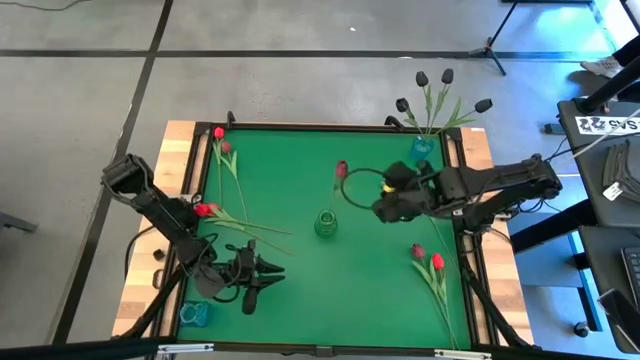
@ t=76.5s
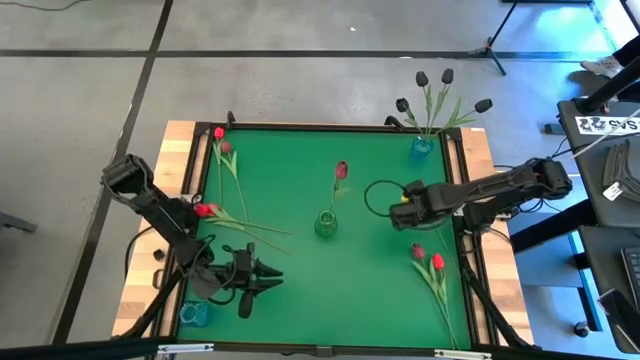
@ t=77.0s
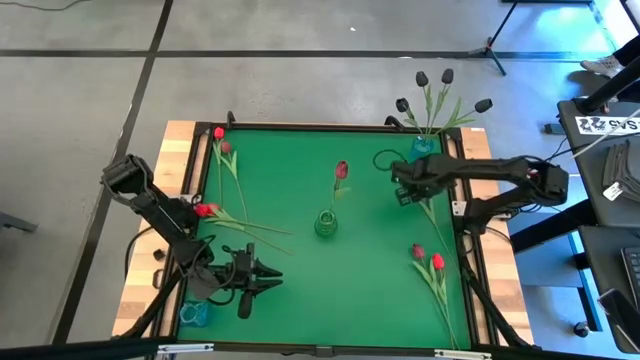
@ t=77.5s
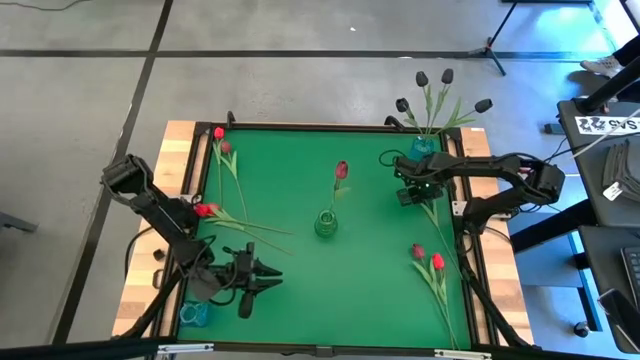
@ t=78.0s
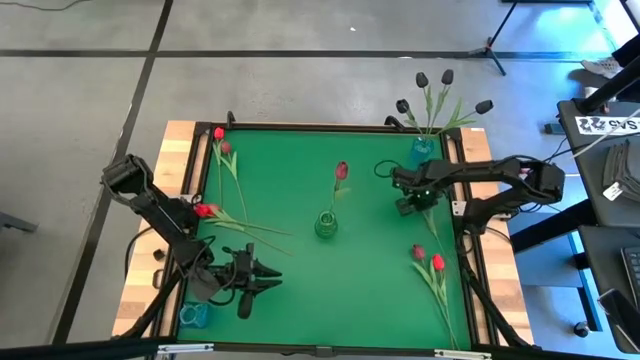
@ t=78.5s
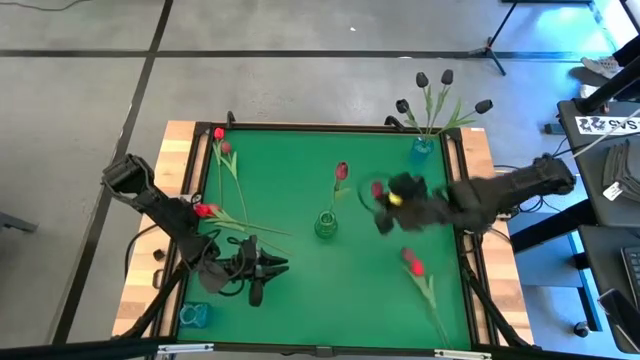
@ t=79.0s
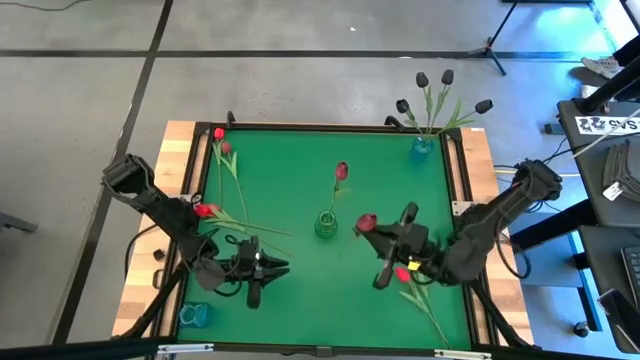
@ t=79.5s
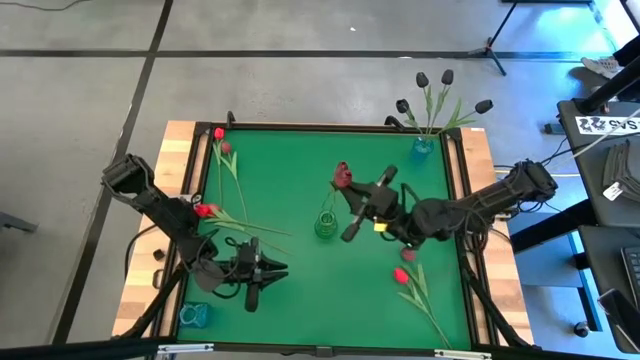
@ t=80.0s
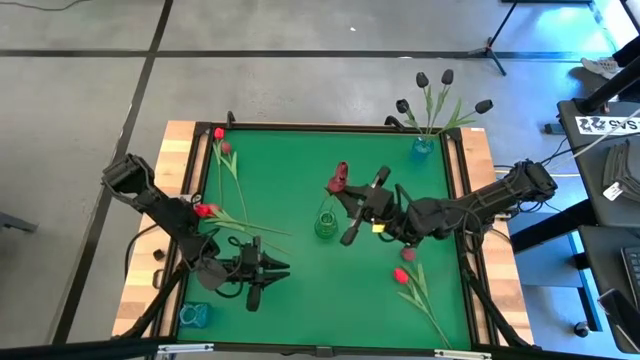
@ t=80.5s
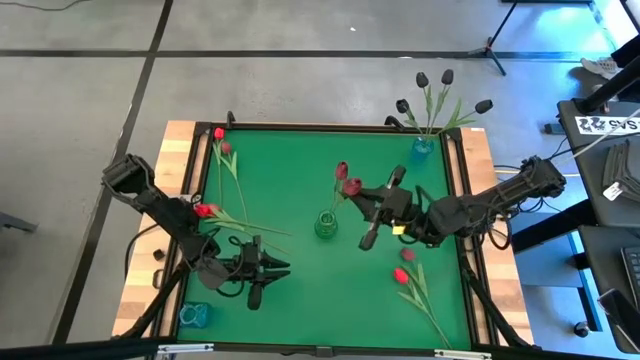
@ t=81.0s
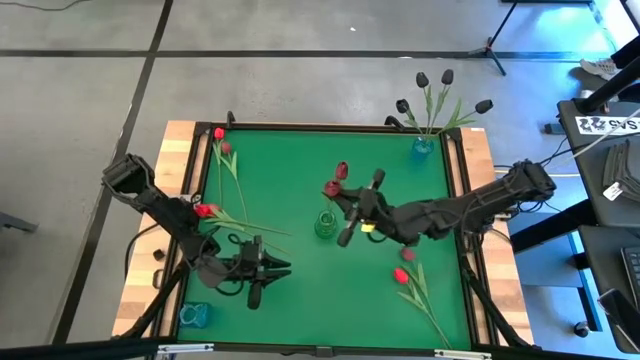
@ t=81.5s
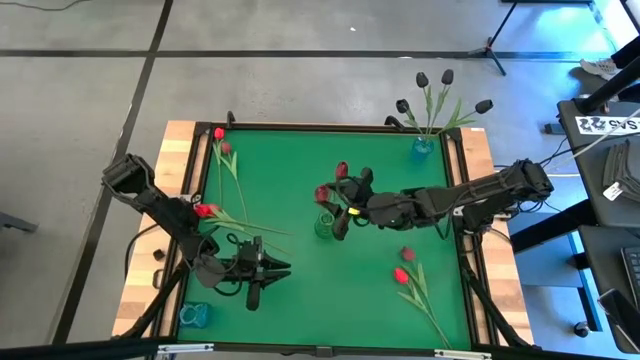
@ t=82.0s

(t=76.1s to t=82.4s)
Task: Sort flowers into vase by color
Put the middle right pink flower into the green vase

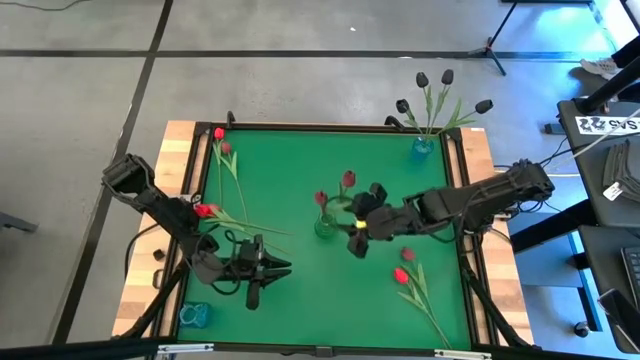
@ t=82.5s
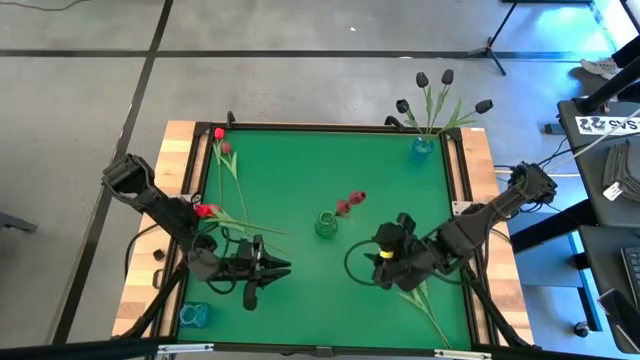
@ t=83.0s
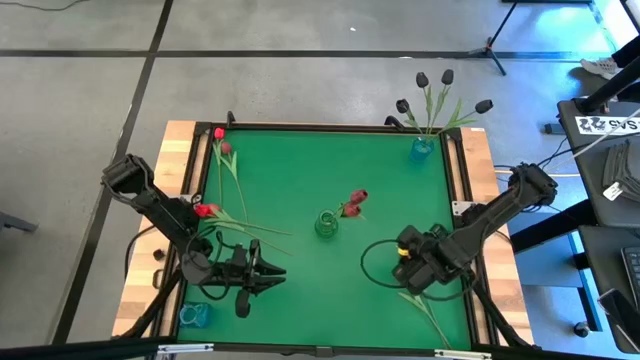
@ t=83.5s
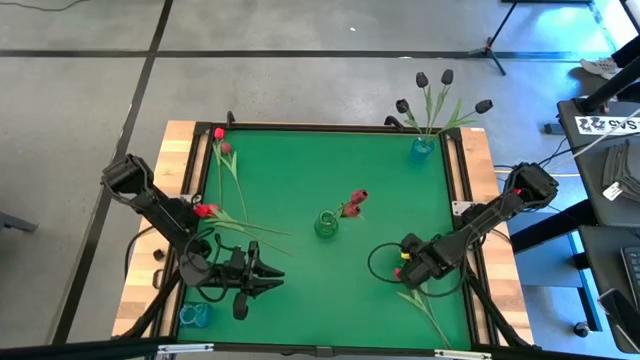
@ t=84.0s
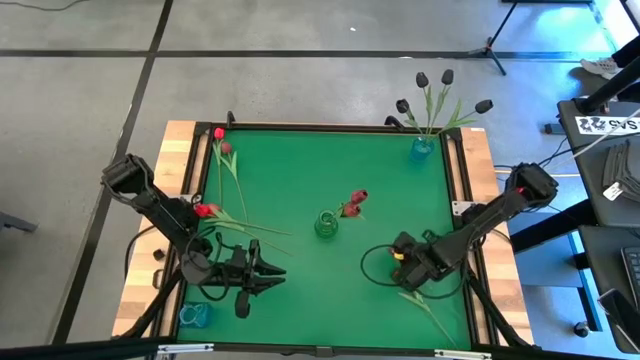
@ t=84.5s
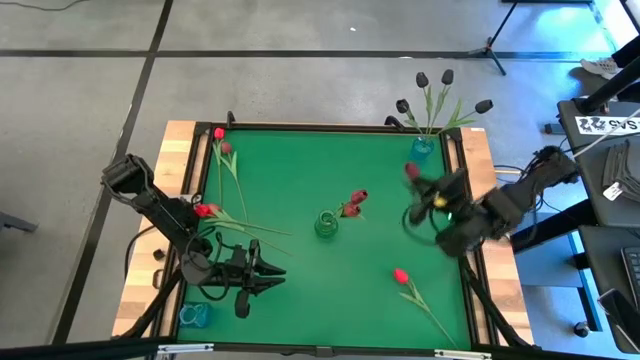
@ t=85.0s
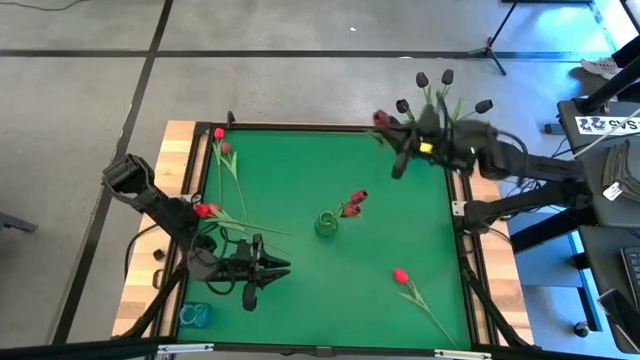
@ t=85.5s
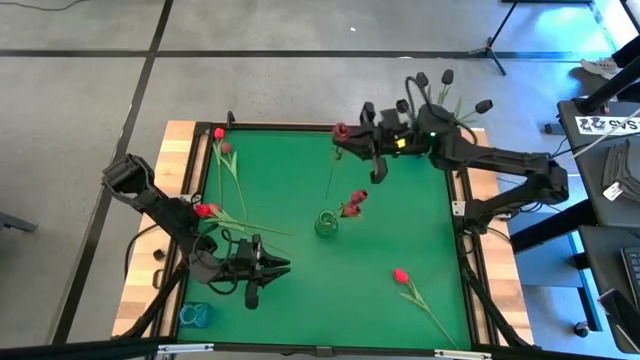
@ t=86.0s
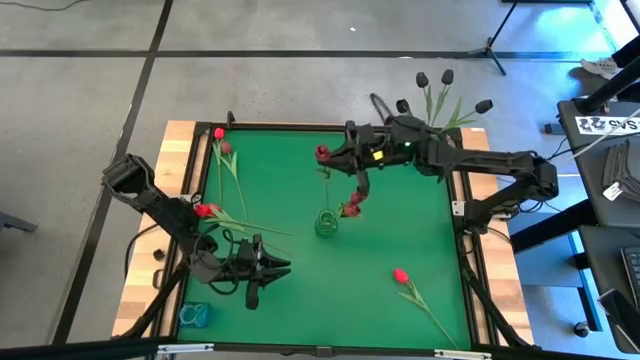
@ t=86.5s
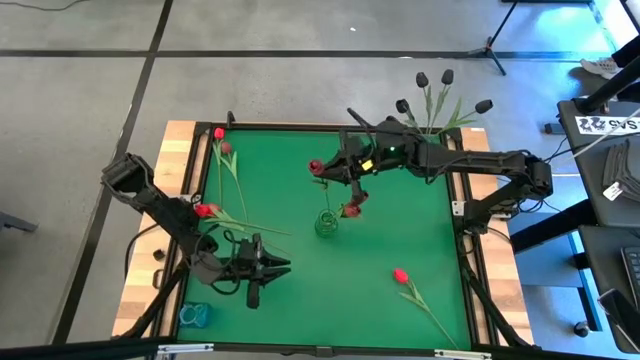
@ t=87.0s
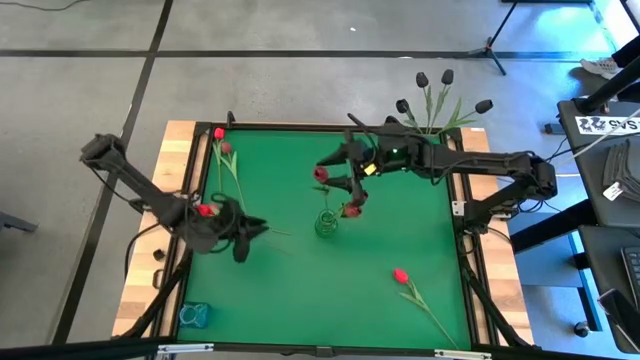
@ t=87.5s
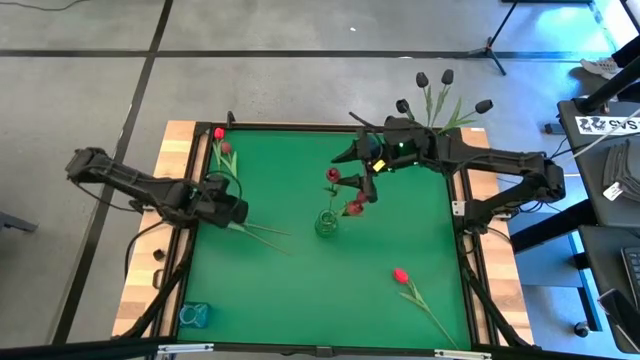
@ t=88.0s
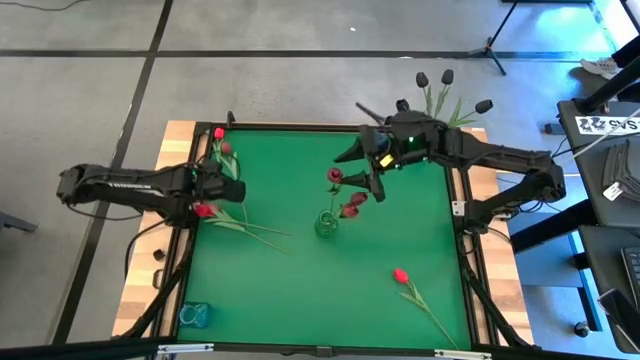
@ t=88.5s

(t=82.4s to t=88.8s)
Put the bottom pink flower into the green vase

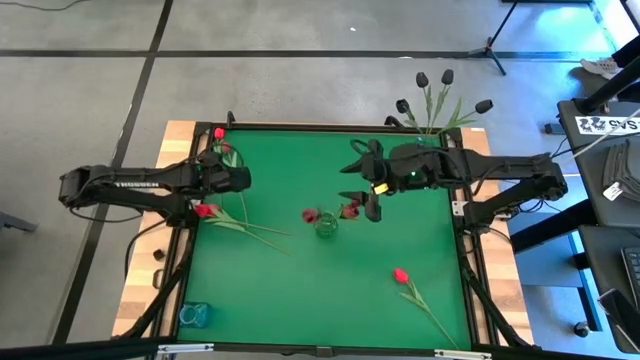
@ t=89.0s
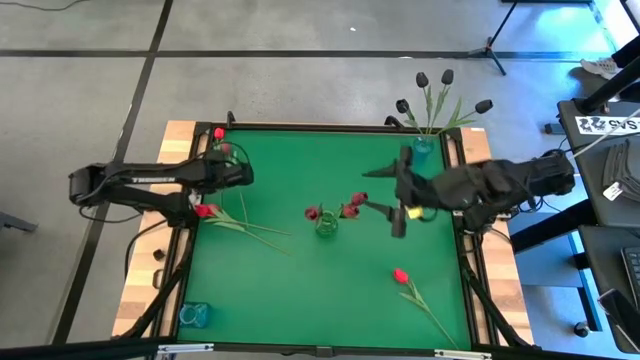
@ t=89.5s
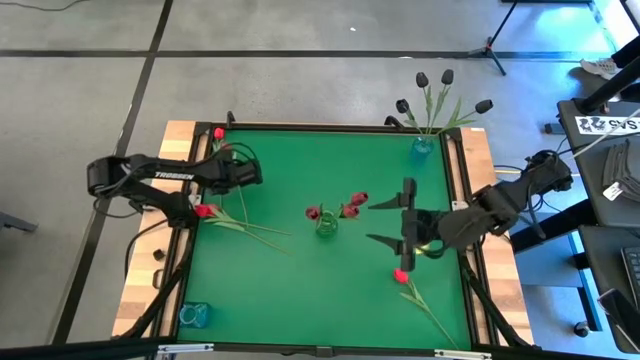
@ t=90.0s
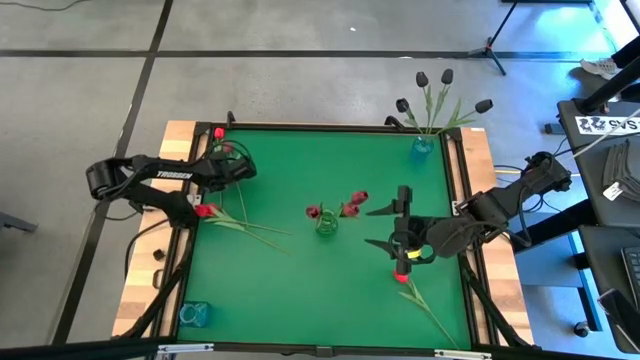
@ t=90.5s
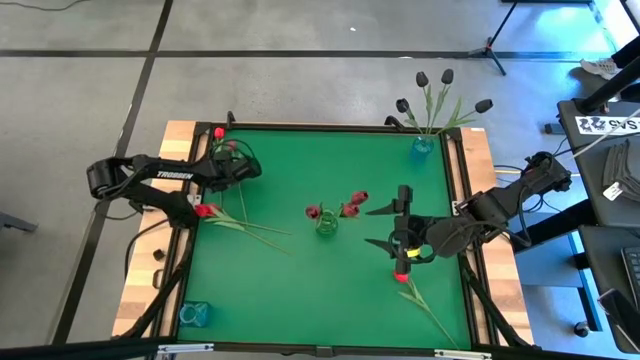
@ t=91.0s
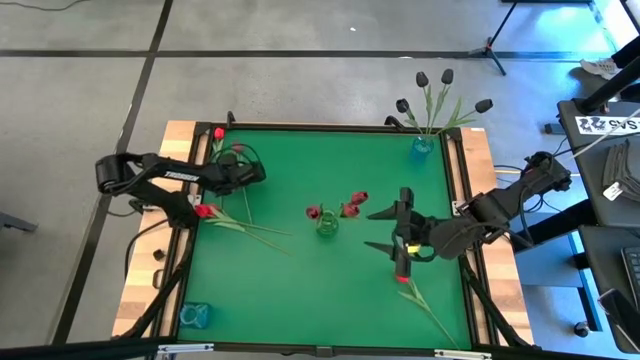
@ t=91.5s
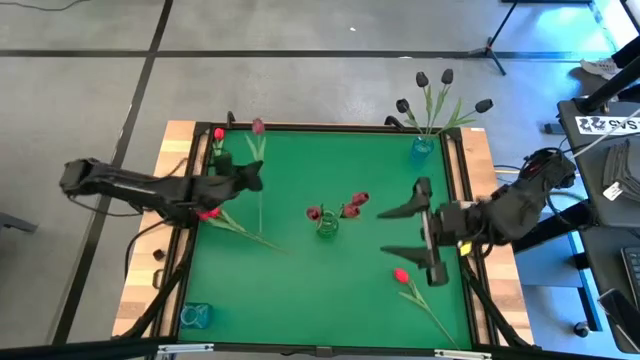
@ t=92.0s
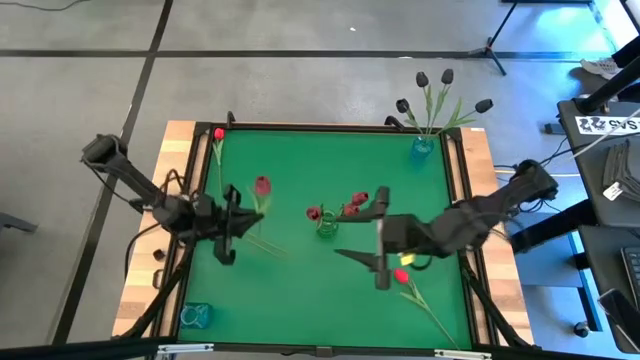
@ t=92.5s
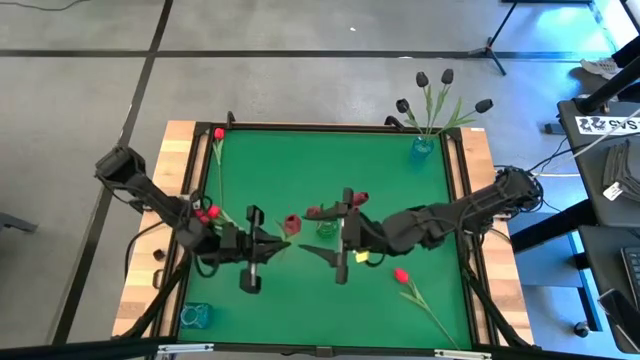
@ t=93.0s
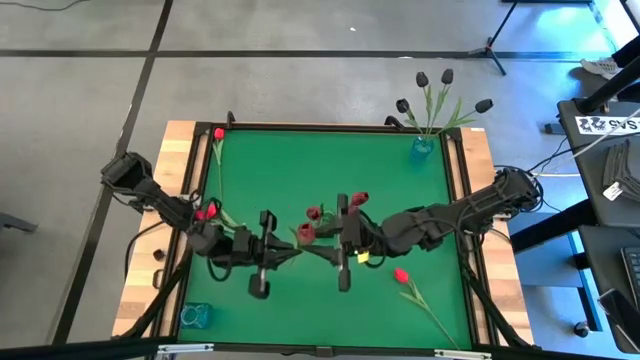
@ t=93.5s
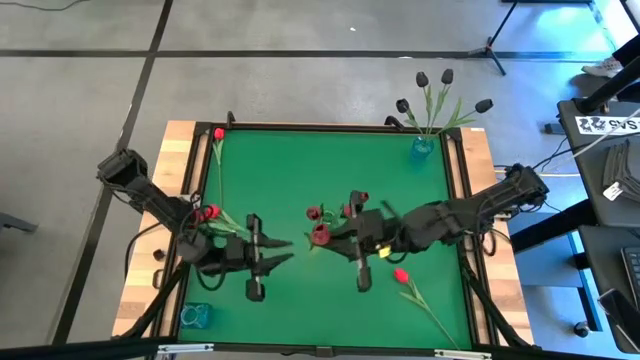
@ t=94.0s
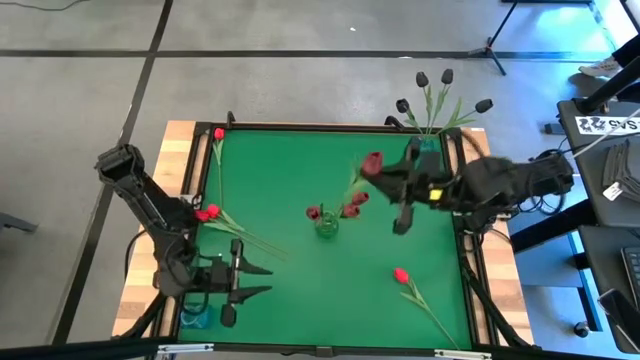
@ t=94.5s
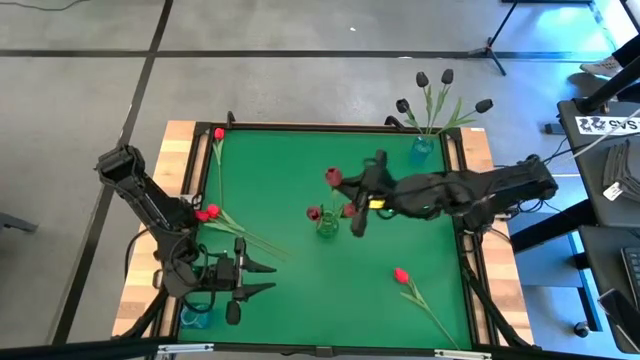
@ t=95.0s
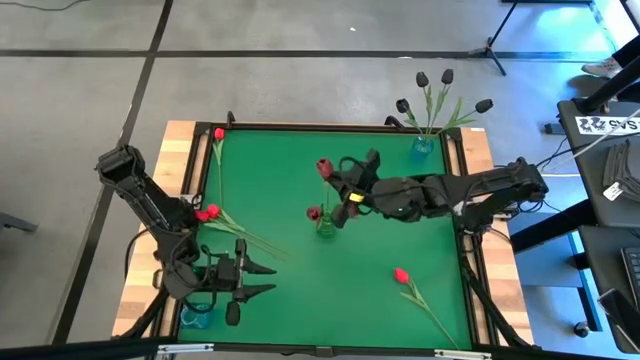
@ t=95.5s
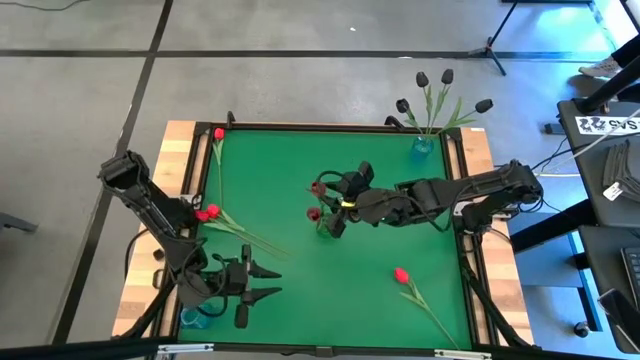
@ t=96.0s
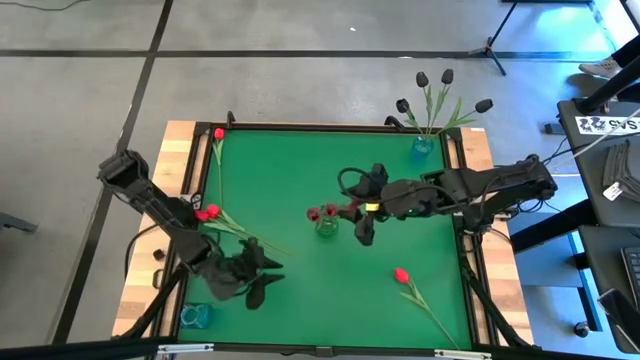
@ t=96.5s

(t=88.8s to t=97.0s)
Put the pink flower into the green vase

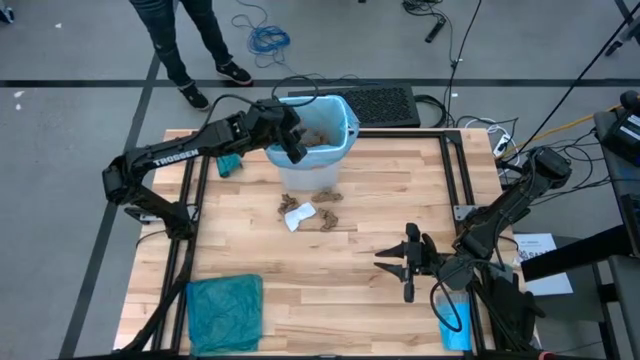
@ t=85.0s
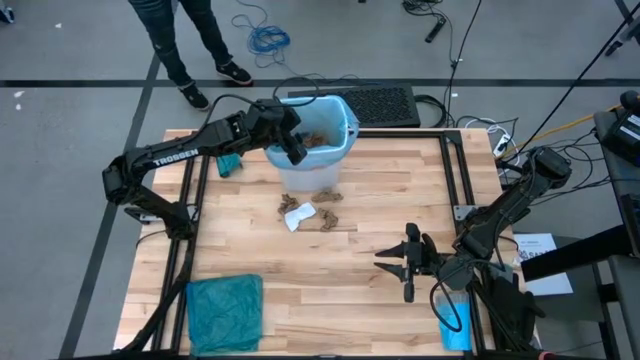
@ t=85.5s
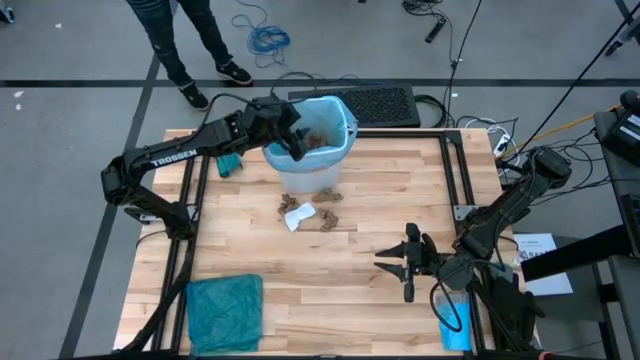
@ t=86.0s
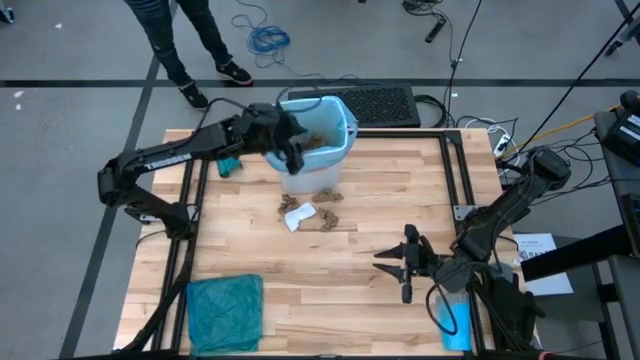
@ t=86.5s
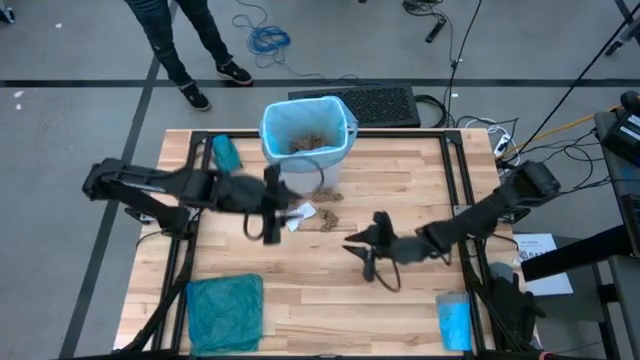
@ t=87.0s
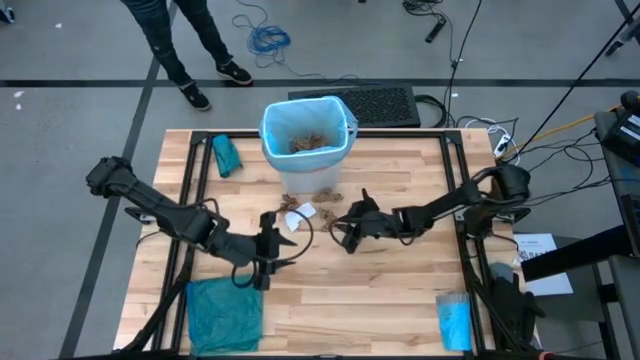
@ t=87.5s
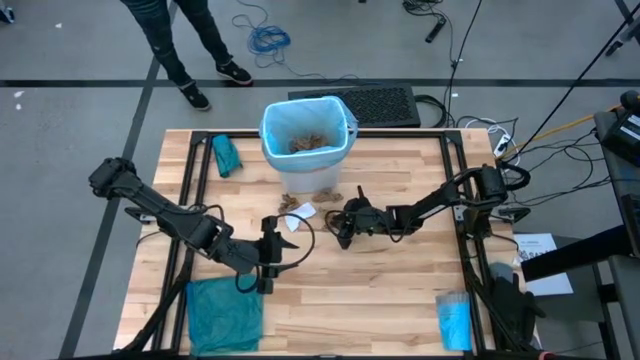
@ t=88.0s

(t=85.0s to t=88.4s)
Task: place trash/remove bag and relplace
Put the brown paper into the blue trash bag inside the white trash bin
